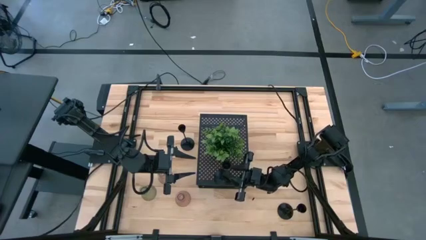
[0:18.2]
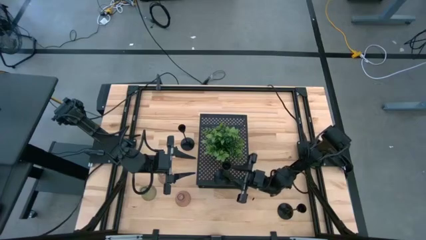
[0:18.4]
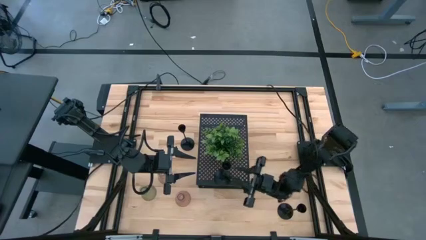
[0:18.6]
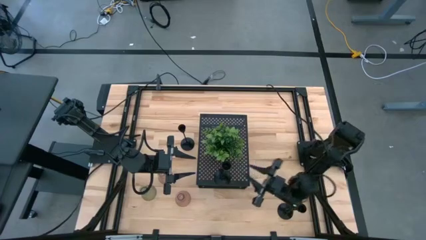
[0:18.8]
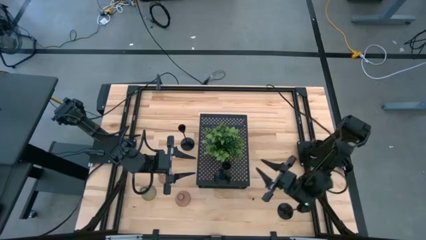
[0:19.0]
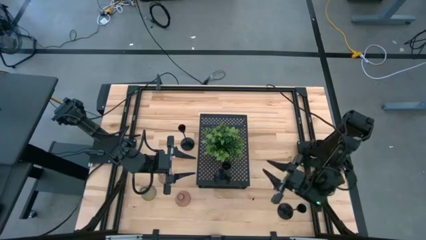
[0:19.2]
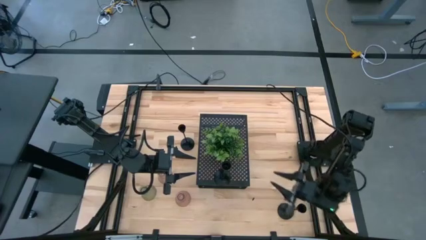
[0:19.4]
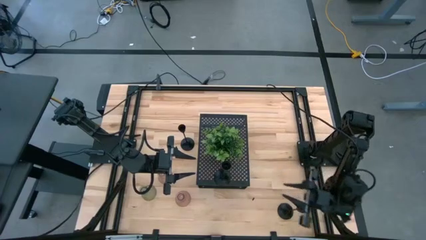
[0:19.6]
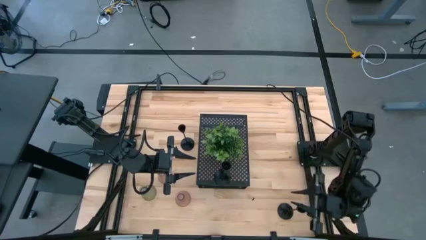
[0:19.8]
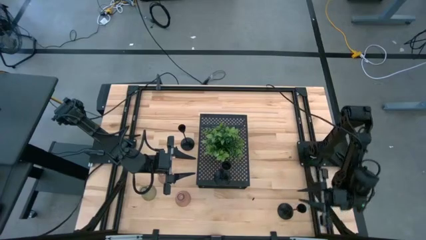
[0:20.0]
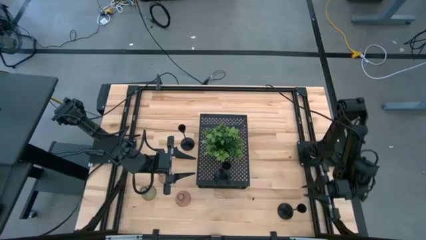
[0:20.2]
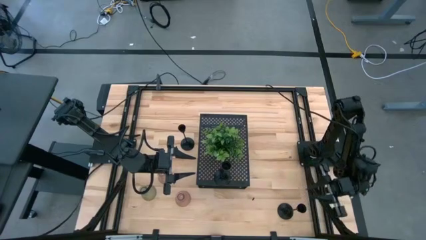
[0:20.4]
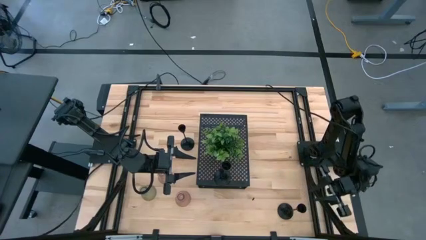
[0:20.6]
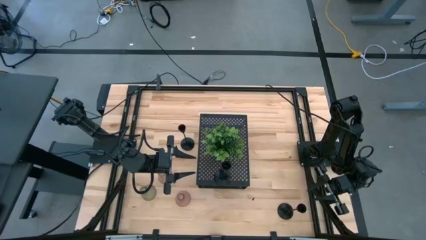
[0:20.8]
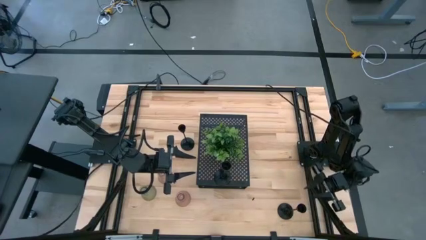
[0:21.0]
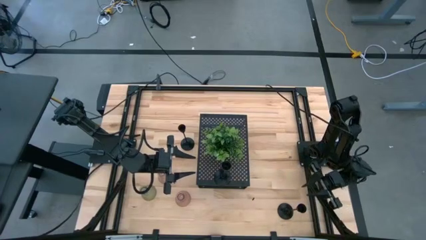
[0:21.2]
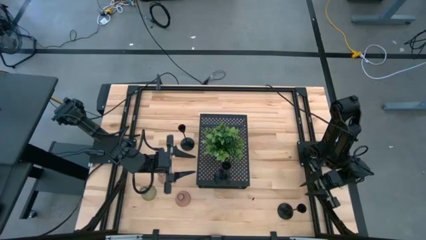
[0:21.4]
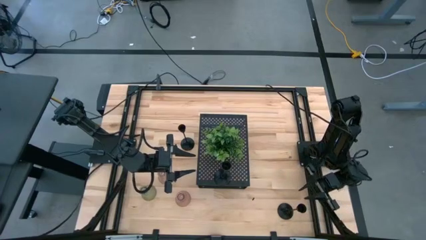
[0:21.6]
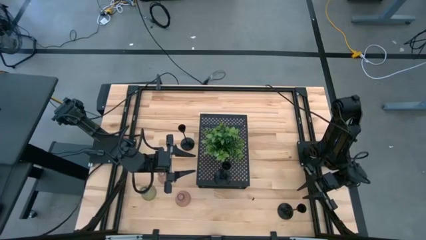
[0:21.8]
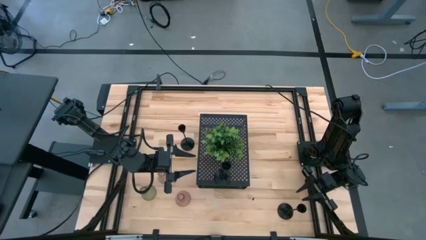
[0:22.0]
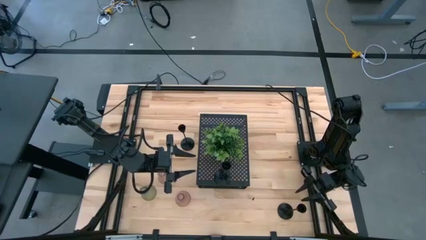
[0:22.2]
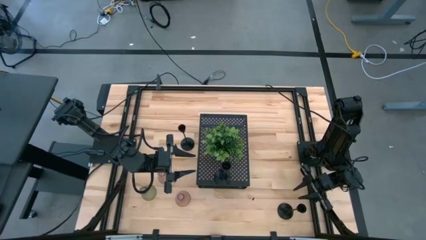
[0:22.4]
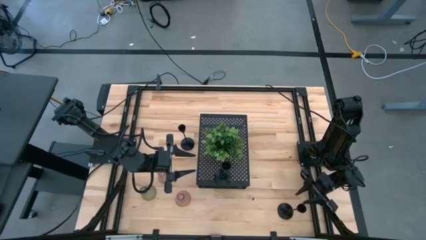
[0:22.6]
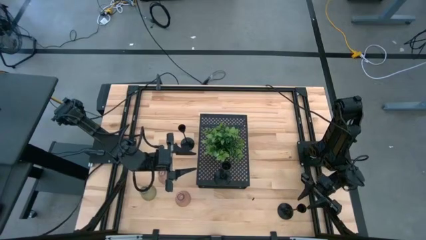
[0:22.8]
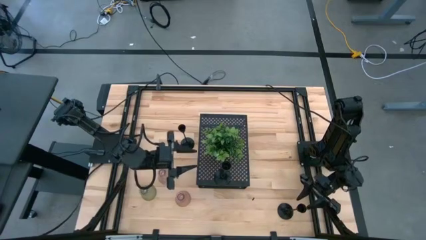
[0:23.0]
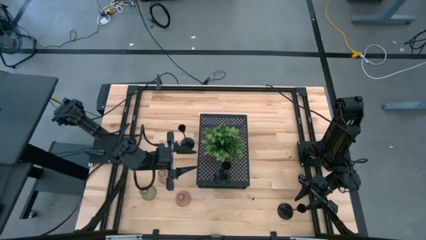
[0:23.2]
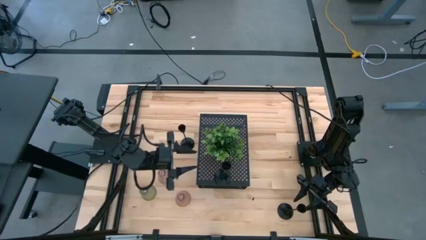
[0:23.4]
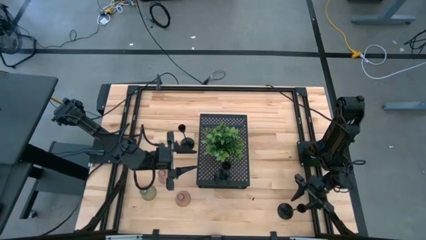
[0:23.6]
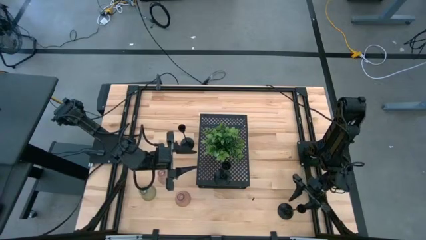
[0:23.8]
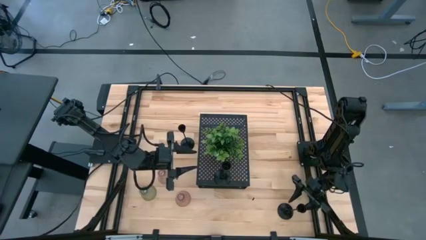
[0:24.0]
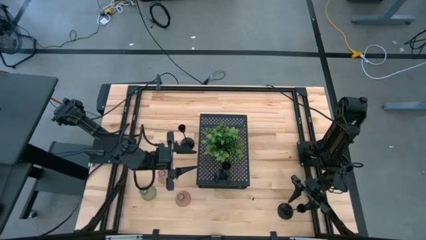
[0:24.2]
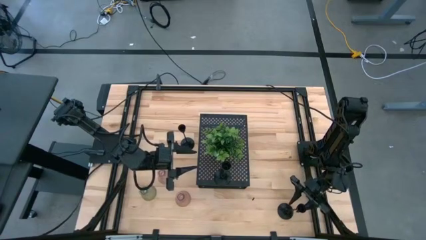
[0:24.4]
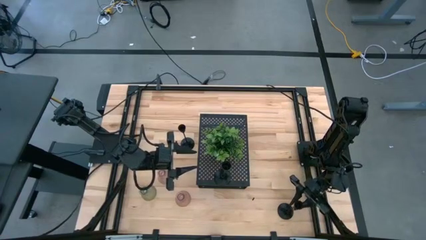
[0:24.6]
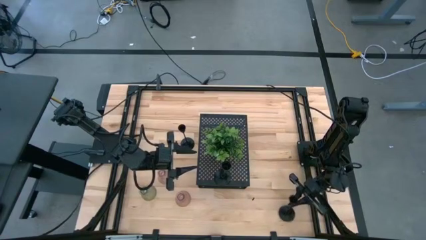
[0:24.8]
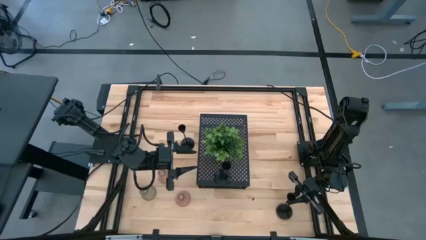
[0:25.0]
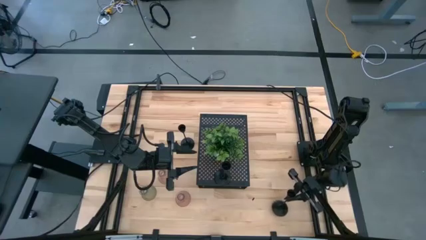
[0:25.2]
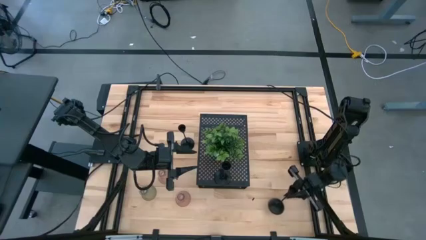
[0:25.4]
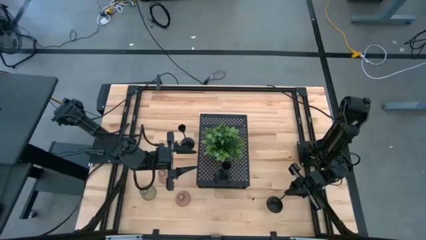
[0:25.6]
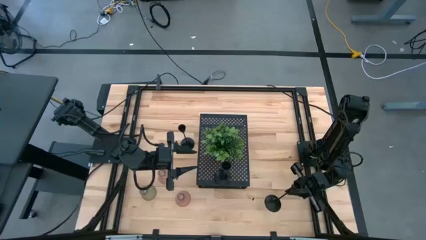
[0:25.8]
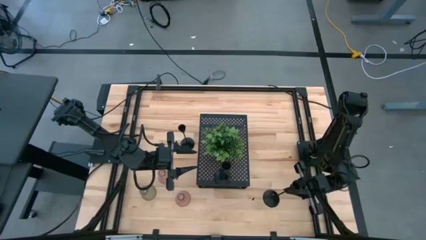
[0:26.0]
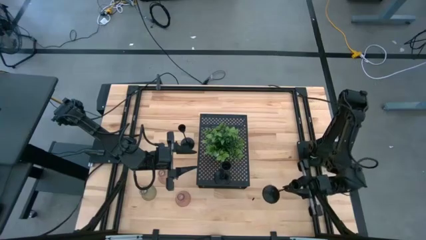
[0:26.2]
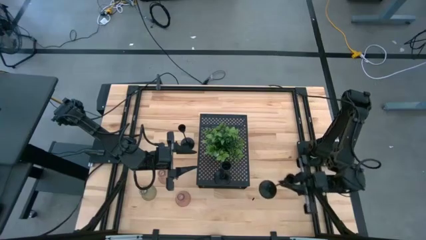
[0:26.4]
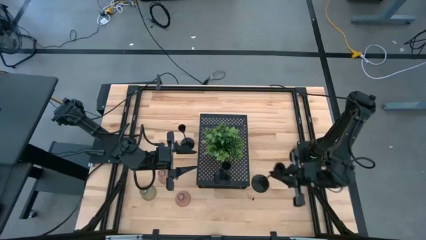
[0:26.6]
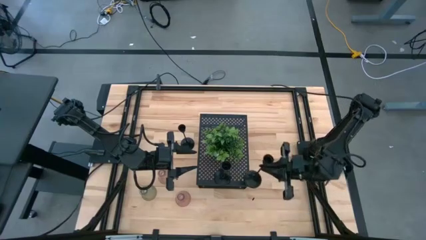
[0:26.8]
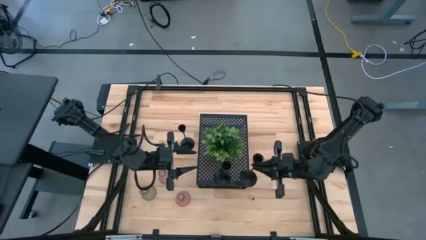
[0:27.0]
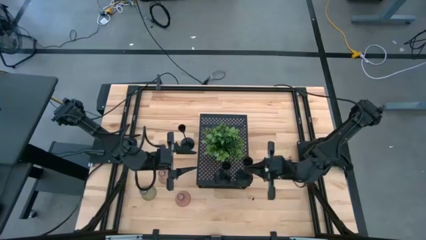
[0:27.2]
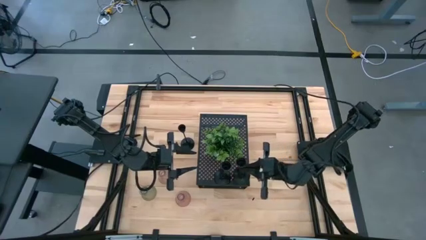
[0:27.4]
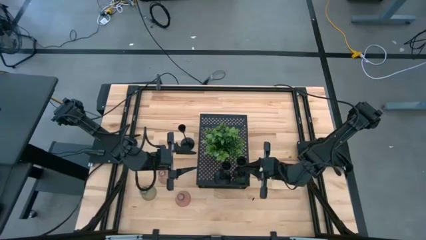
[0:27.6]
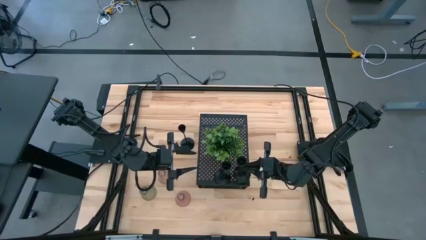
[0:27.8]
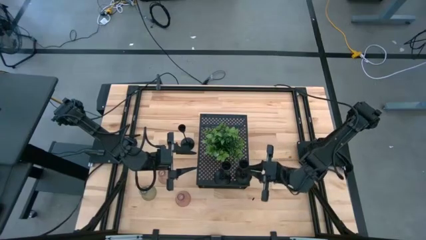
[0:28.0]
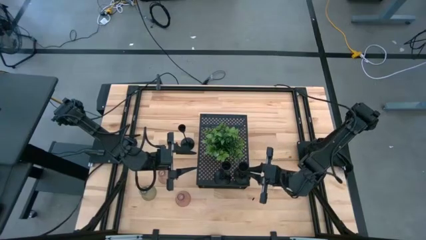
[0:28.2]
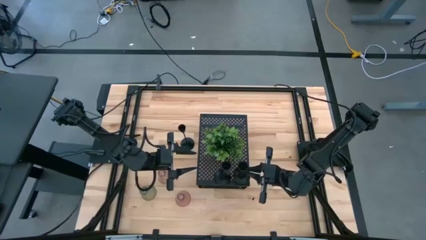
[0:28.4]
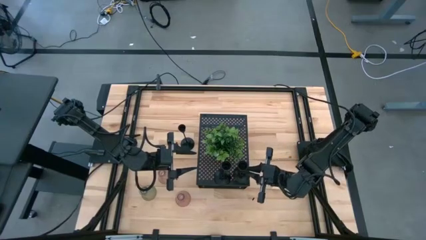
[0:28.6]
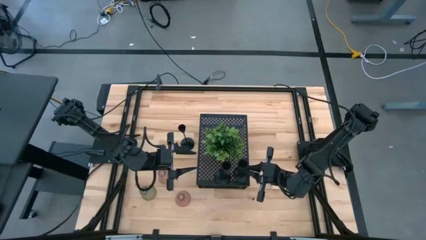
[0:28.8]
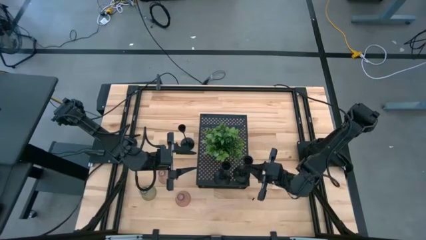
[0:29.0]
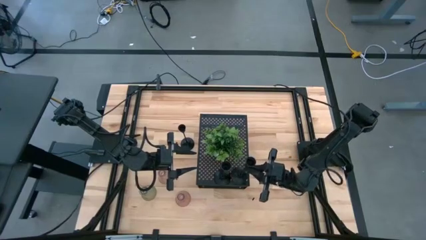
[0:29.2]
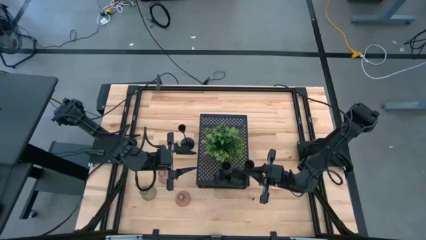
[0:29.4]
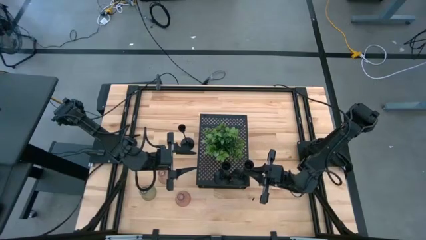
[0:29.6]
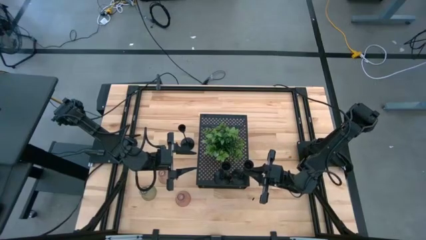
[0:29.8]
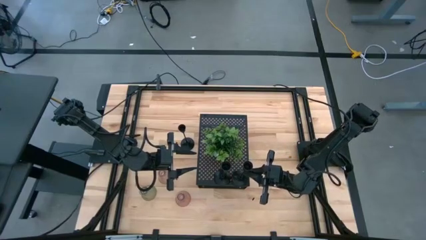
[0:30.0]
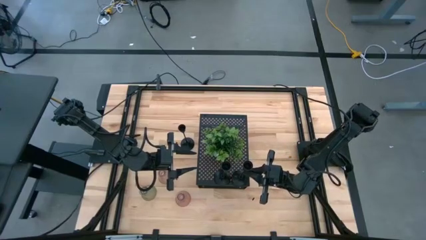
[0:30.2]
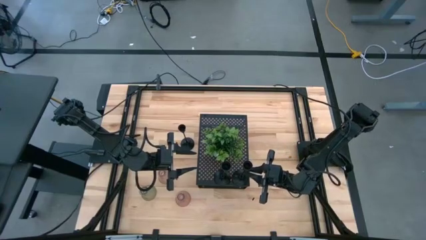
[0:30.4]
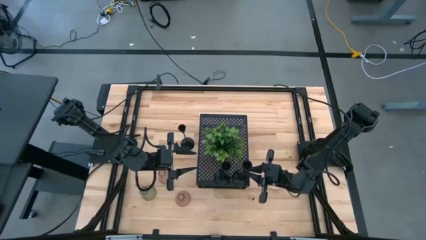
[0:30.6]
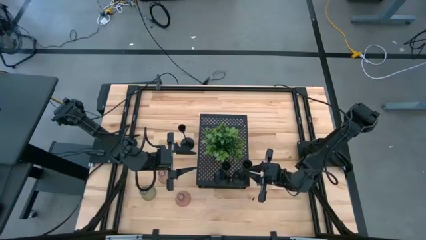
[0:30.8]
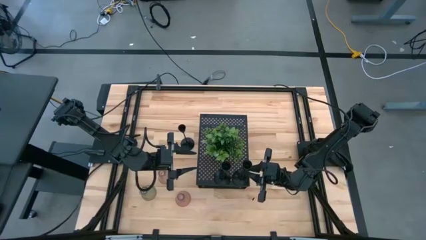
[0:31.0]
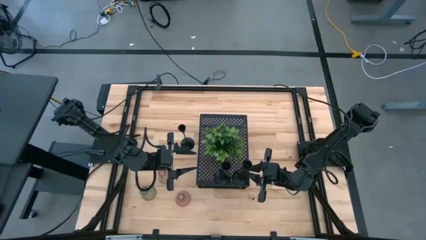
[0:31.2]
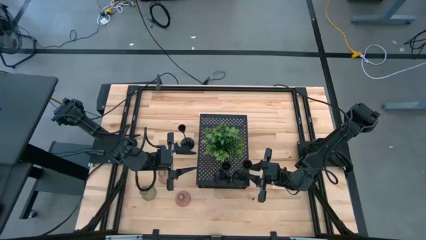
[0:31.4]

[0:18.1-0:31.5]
Task: Pick & Place candle stick holders
Align the right black candle holder with the other black candle holder on the shelf

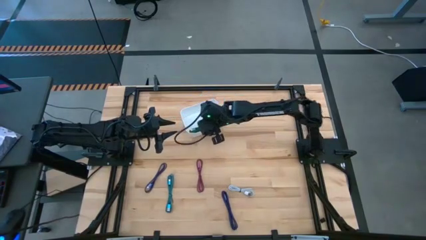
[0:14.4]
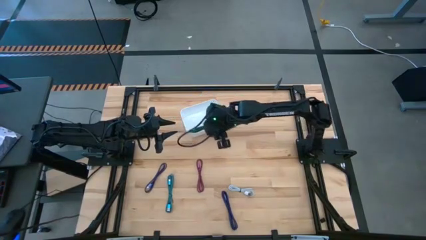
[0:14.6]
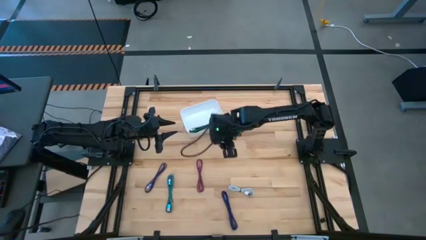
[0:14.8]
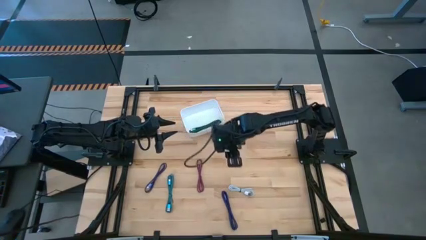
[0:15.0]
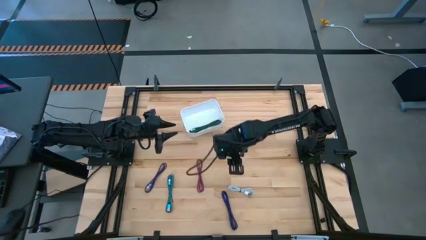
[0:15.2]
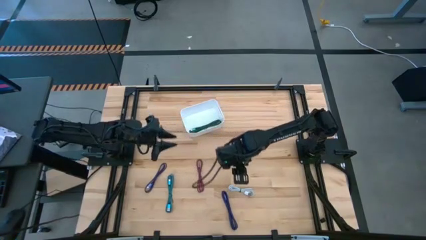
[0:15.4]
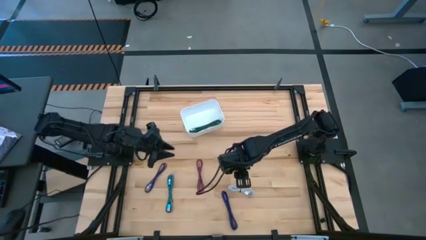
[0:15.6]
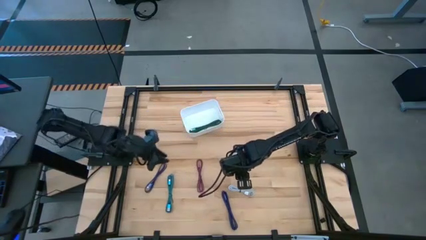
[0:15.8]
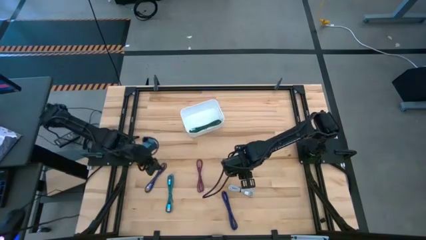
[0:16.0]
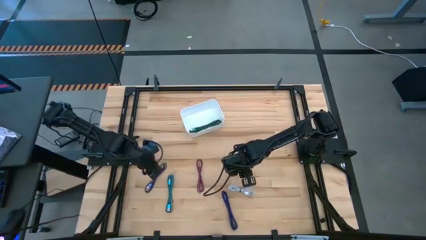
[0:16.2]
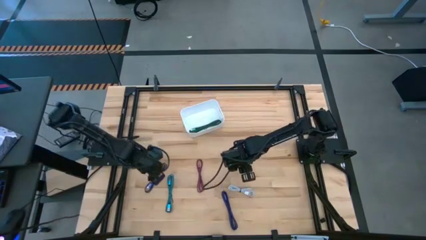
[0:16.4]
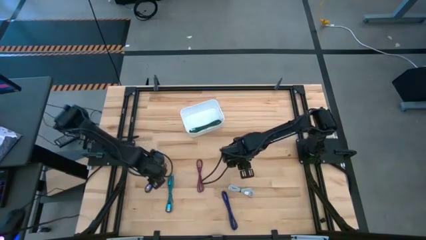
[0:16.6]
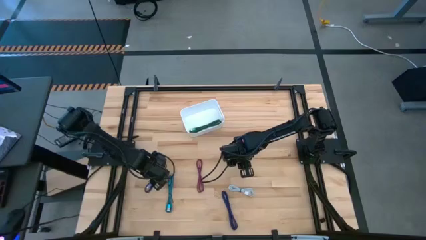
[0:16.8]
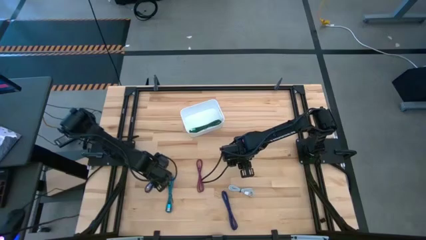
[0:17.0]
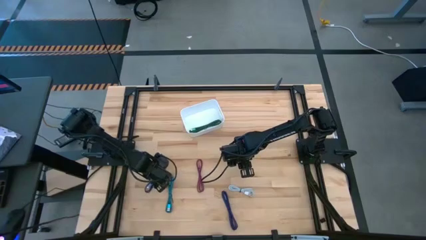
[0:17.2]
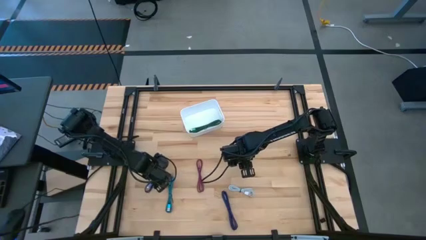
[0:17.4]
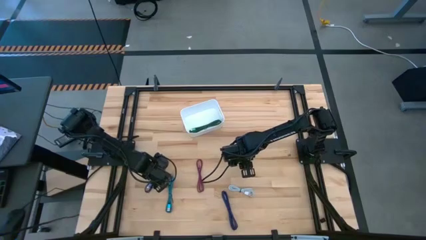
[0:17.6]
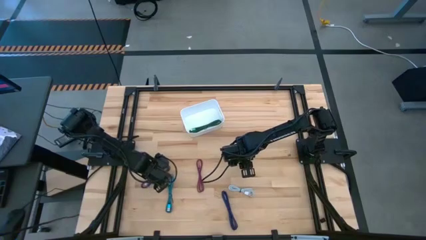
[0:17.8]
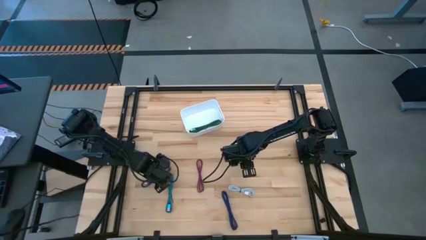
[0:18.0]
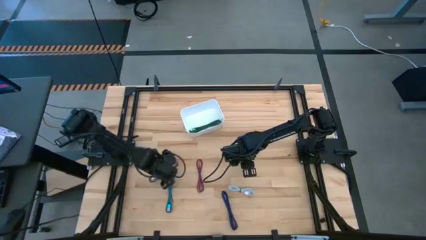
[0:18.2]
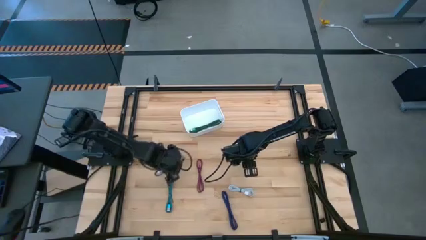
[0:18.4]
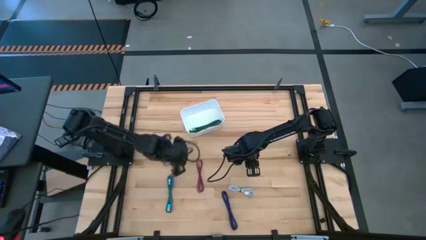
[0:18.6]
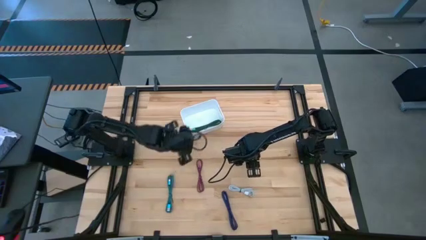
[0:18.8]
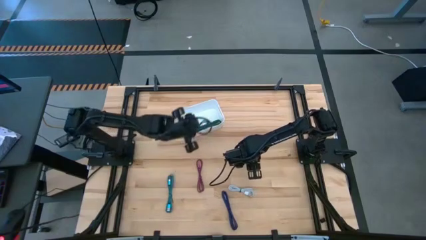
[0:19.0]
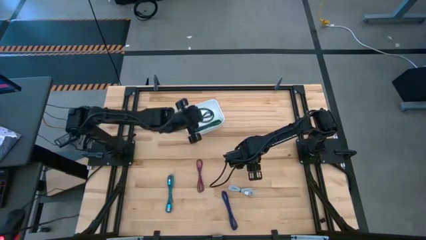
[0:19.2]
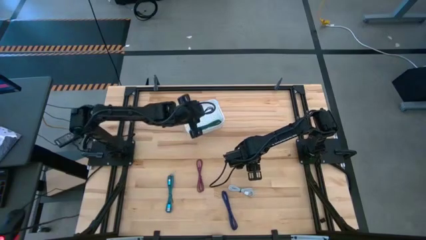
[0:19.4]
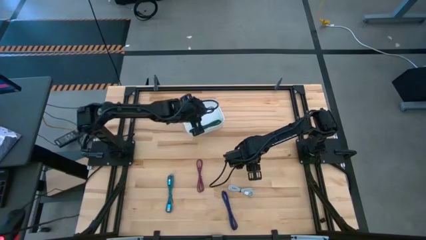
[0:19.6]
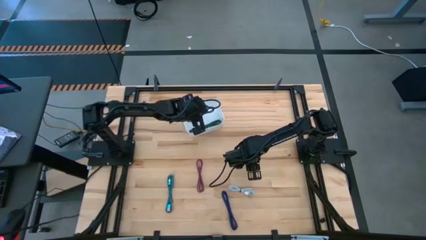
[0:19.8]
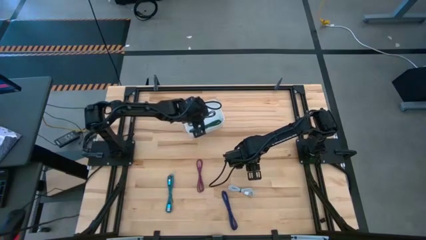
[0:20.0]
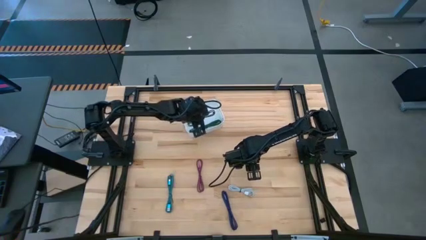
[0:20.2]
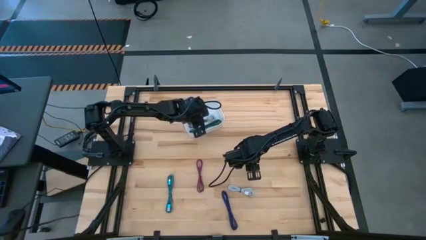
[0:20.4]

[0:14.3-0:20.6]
Task: Pick and place USB-C Cables
Put the left purple charger cable into the white bin
